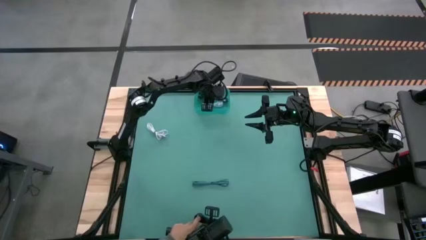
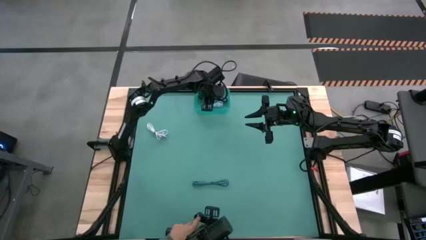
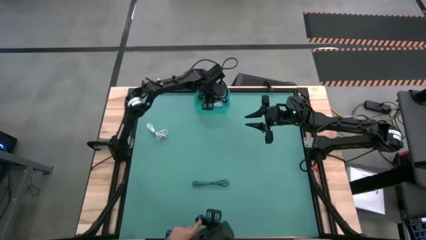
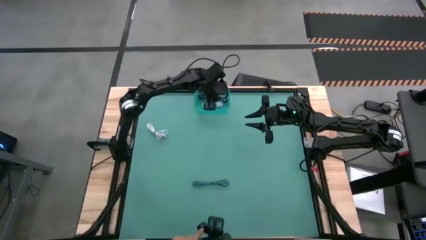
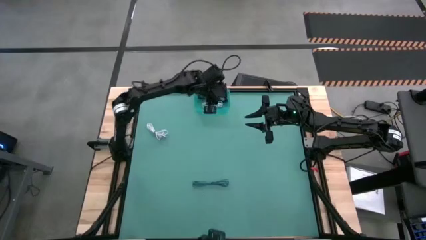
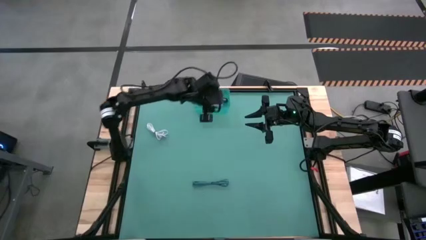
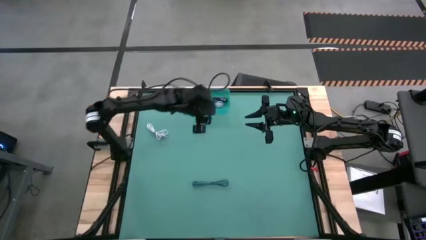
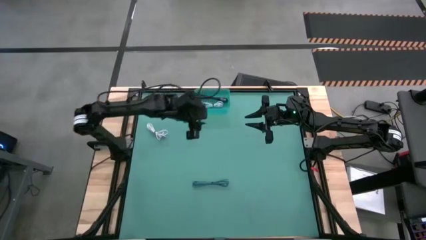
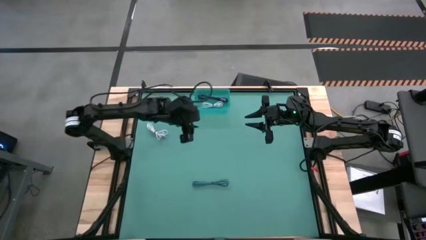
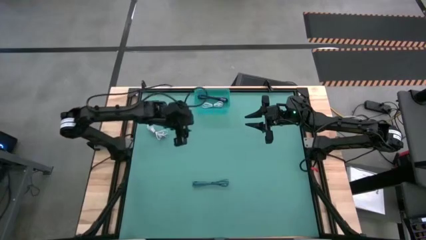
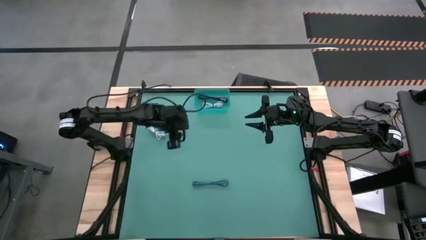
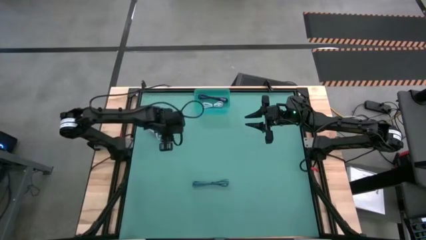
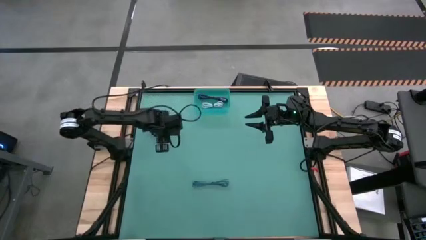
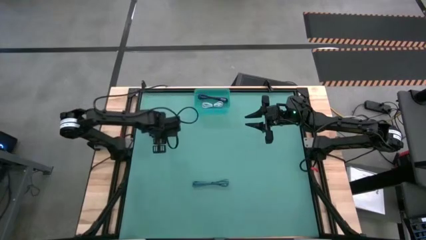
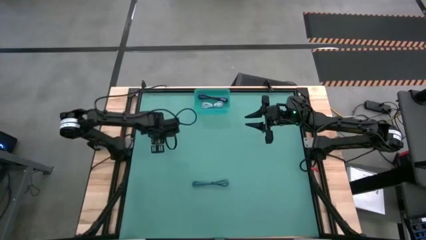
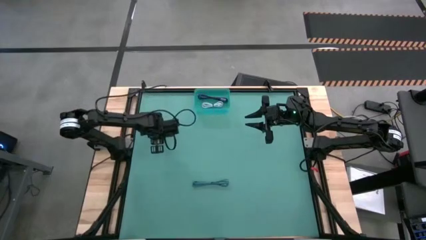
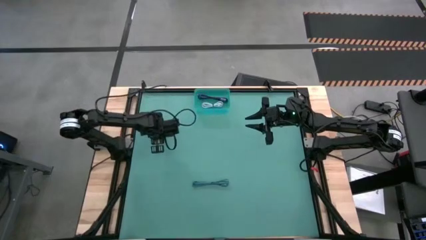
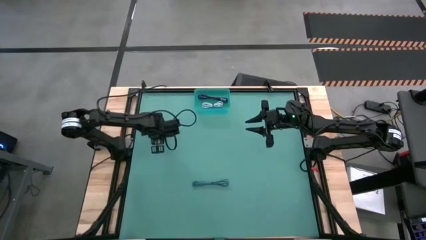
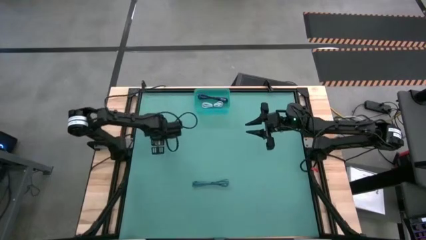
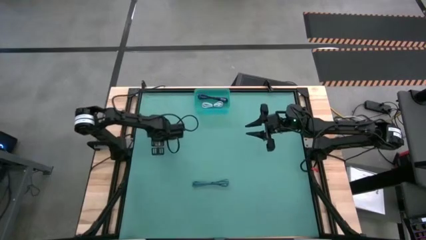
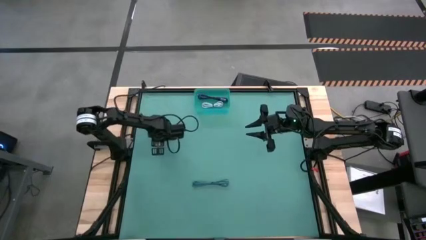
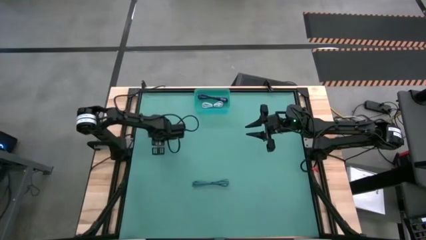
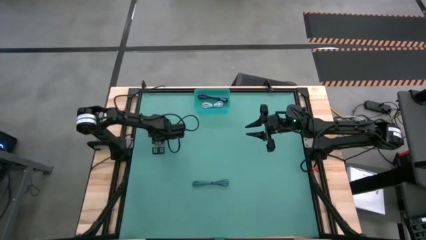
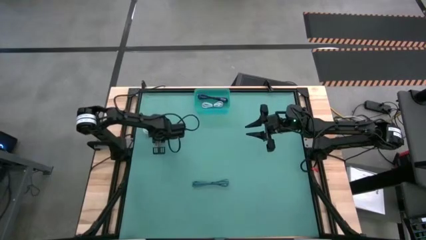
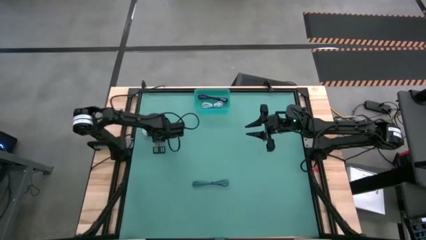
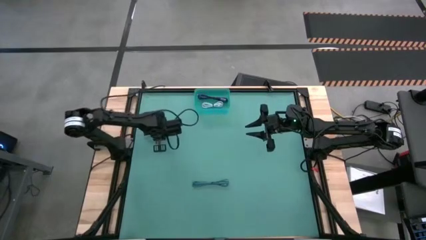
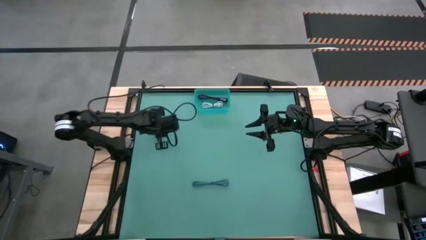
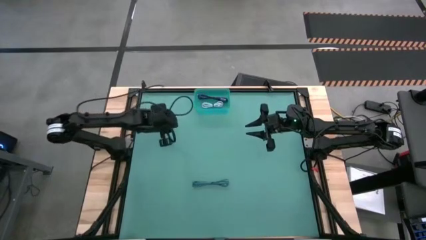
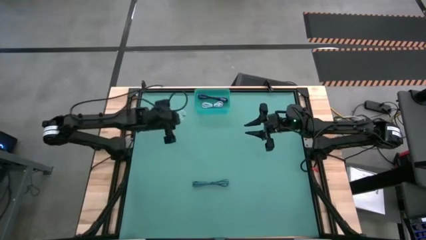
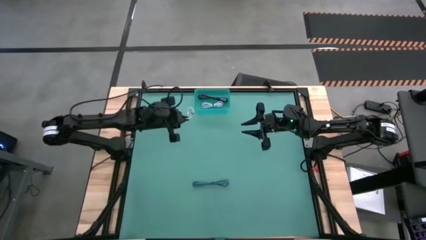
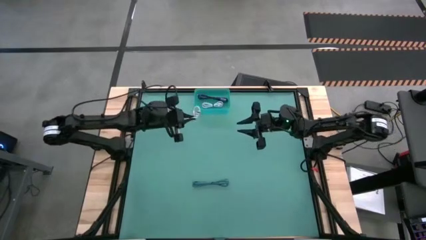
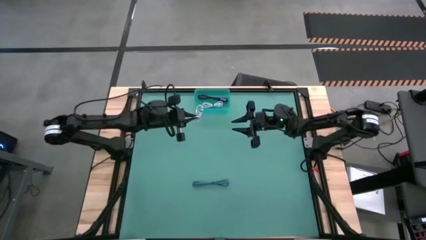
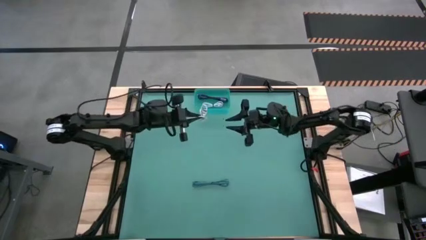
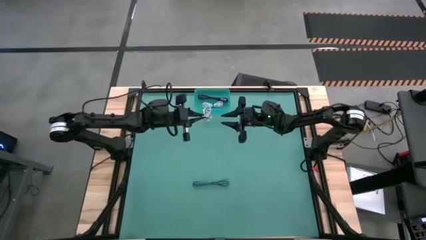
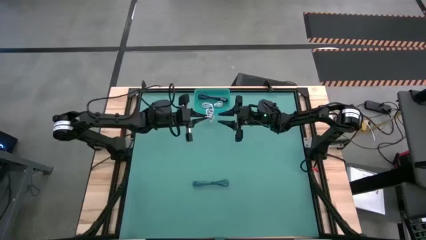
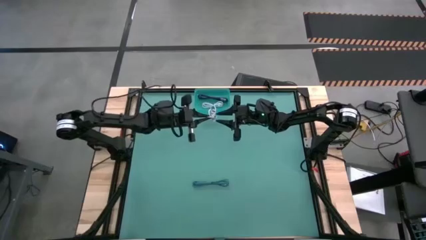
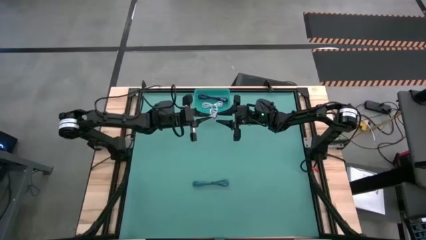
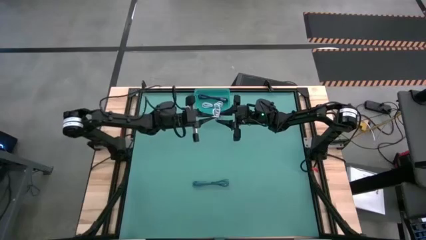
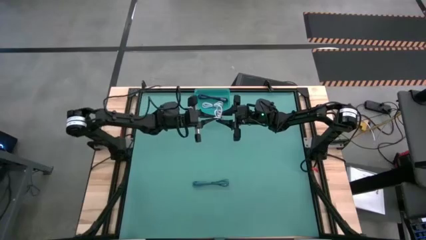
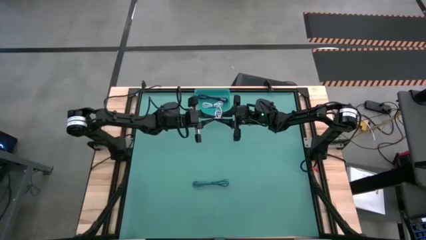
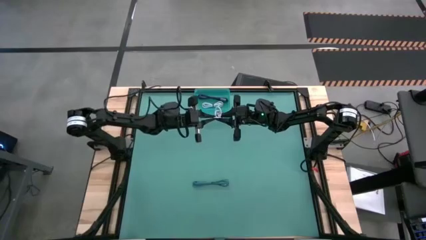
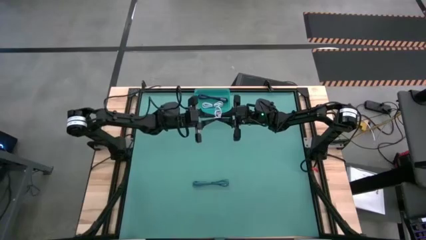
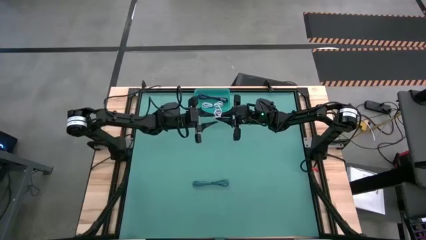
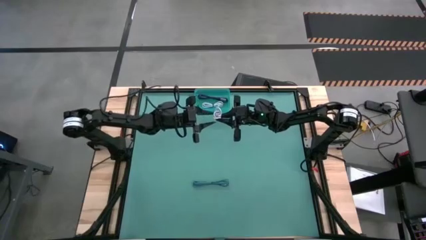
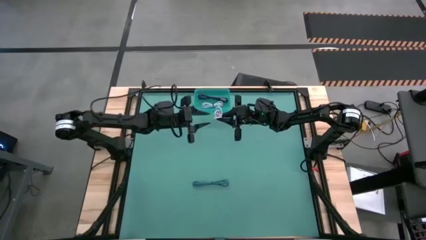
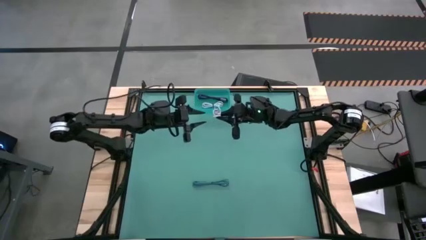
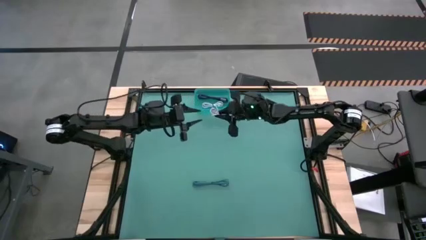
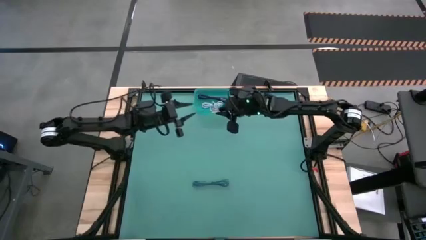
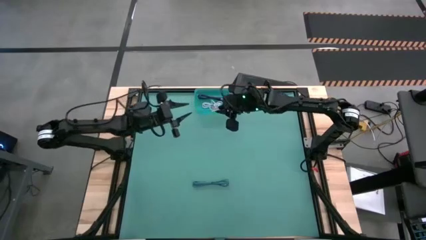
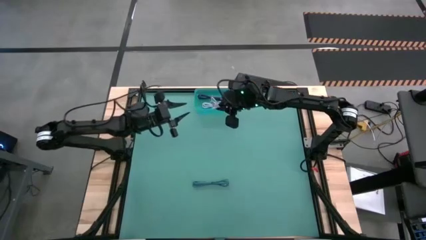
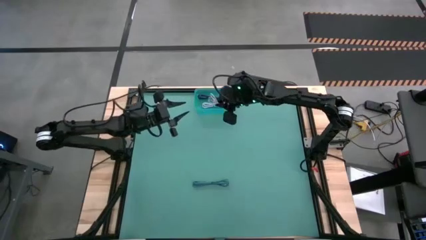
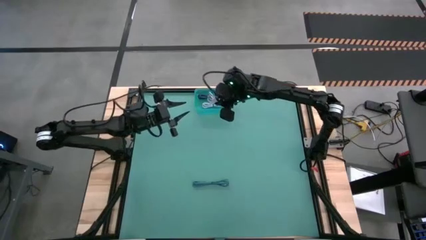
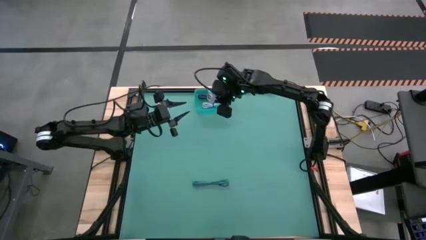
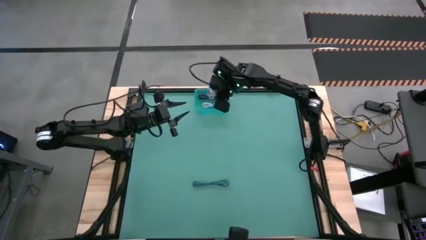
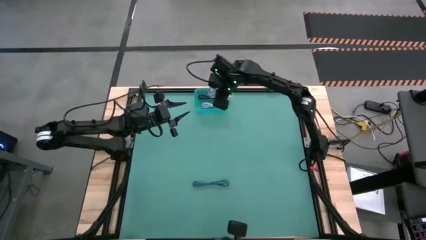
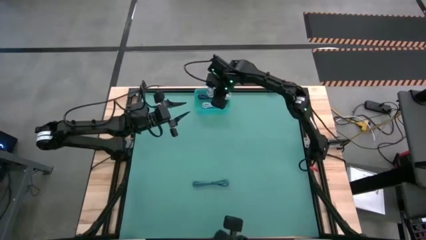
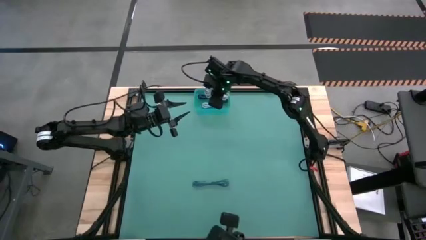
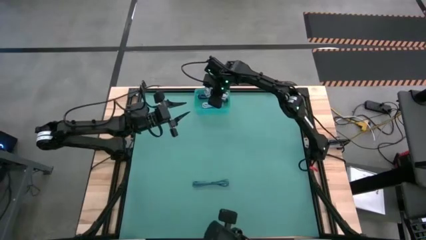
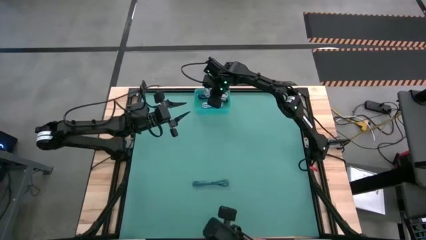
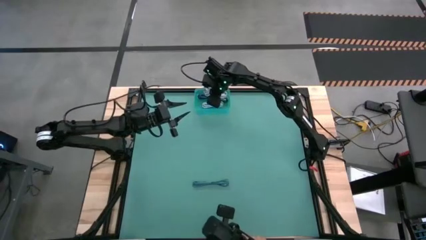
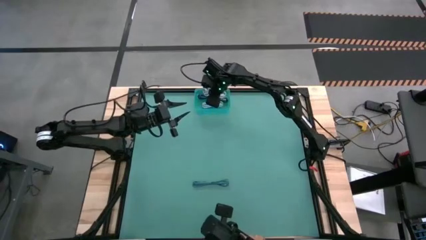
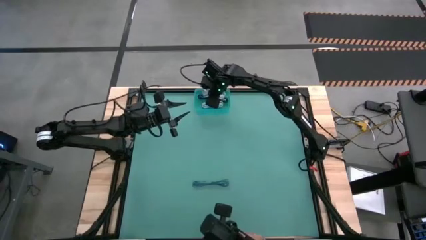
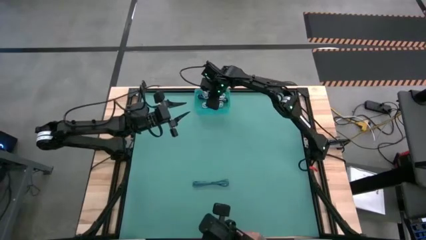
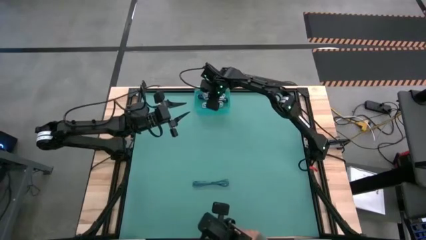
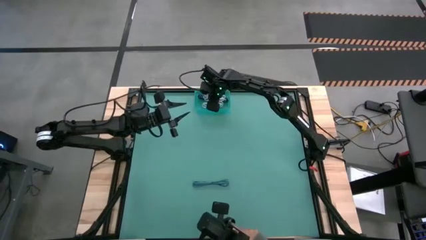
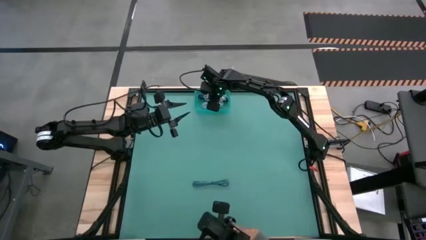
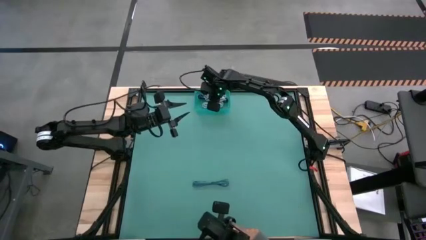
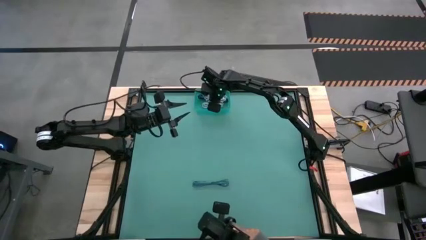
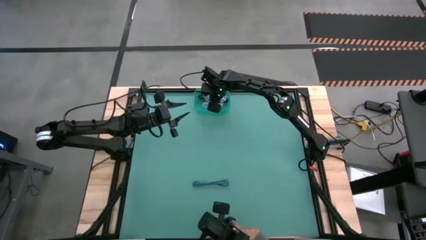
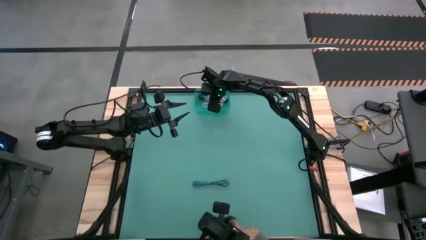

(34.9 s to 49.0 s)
Task: Pick and place USB-C Cables
Put the white charger cable into the green bin
